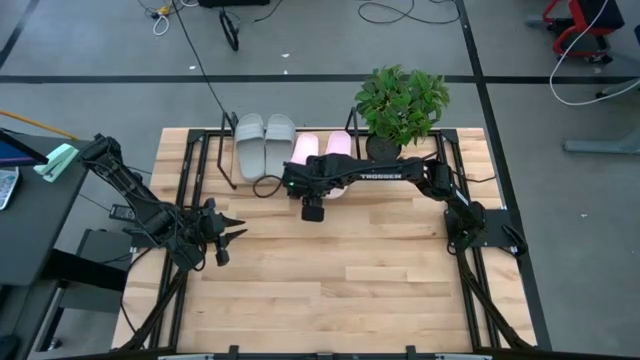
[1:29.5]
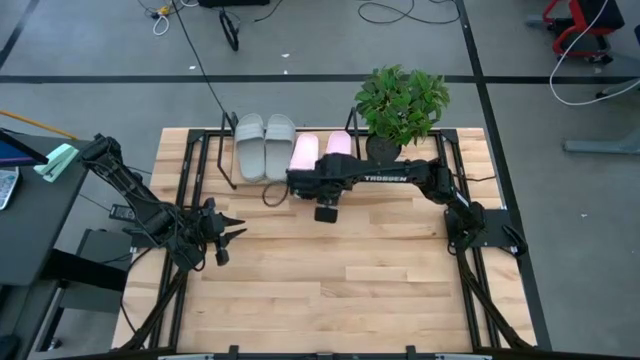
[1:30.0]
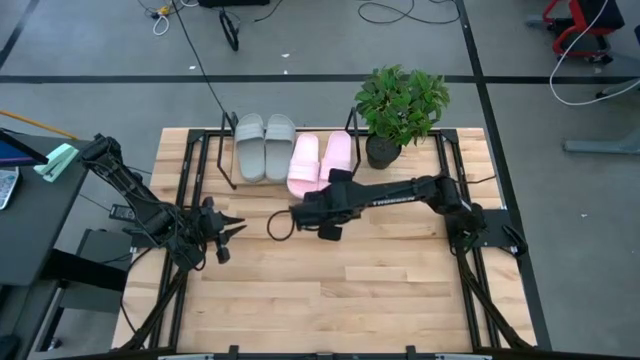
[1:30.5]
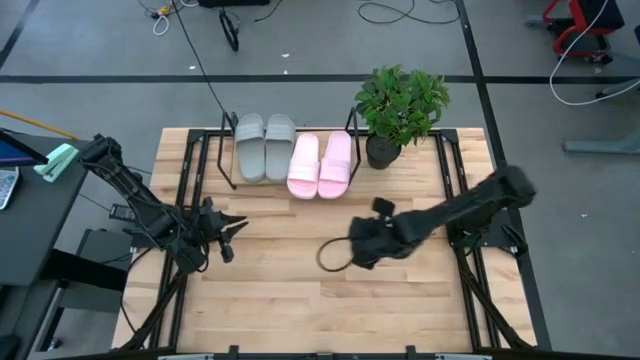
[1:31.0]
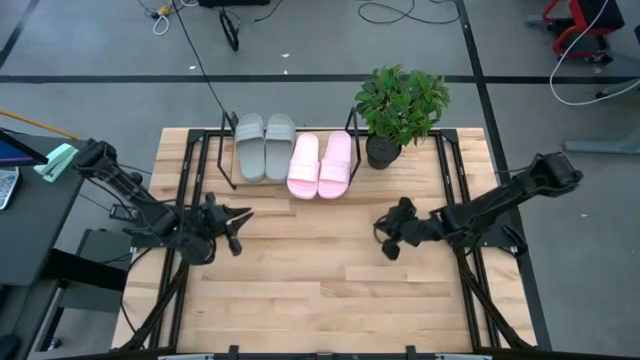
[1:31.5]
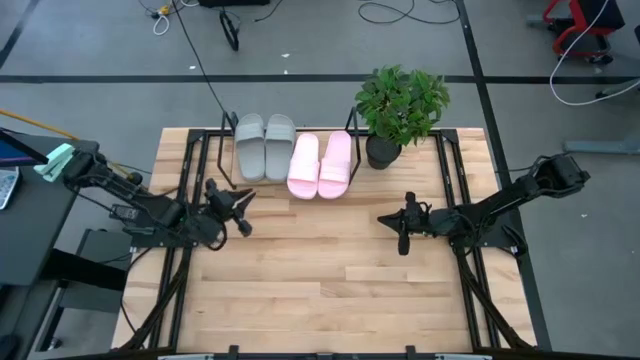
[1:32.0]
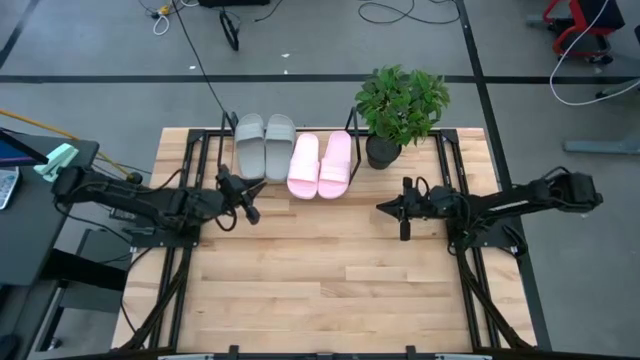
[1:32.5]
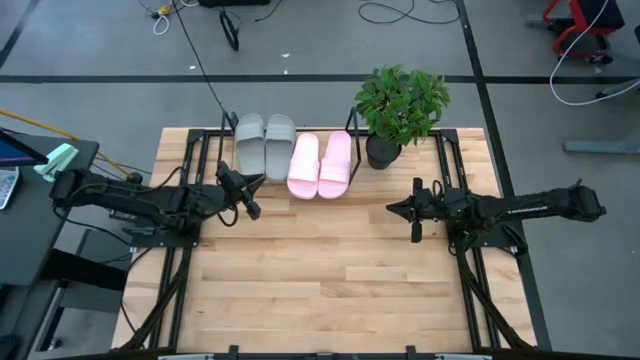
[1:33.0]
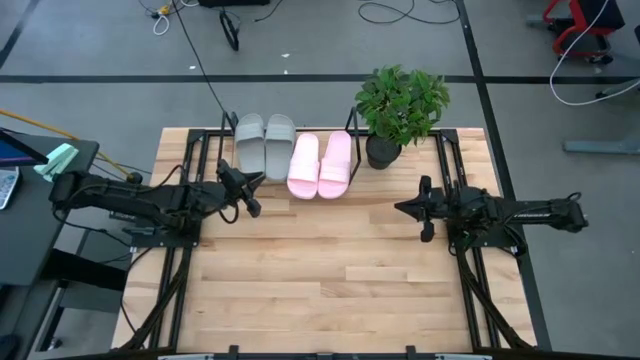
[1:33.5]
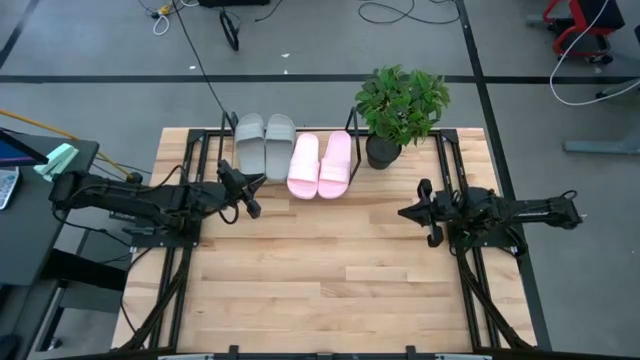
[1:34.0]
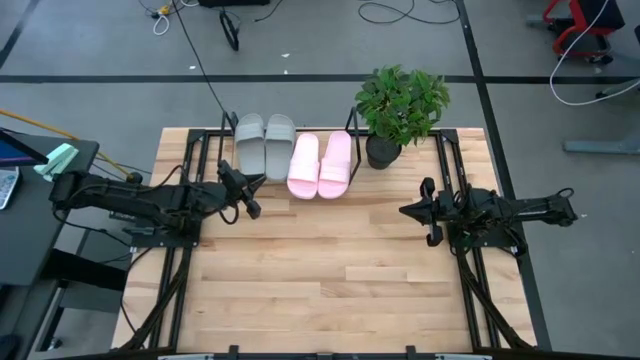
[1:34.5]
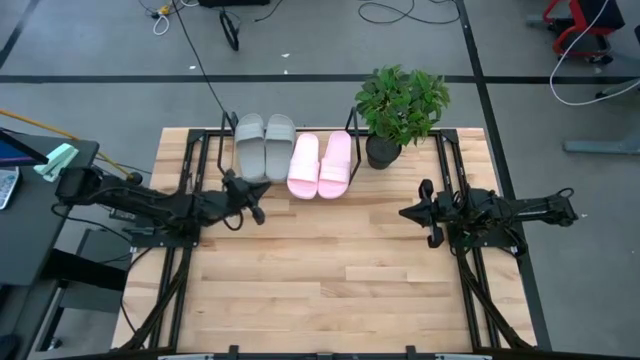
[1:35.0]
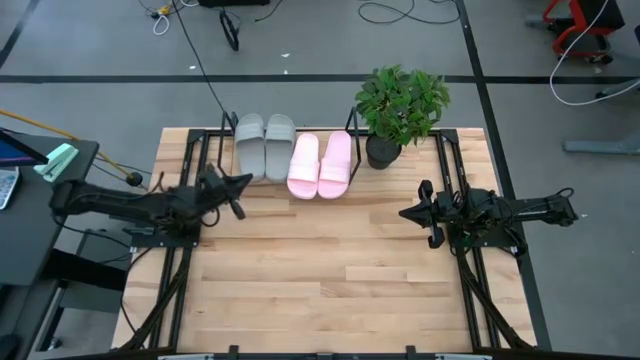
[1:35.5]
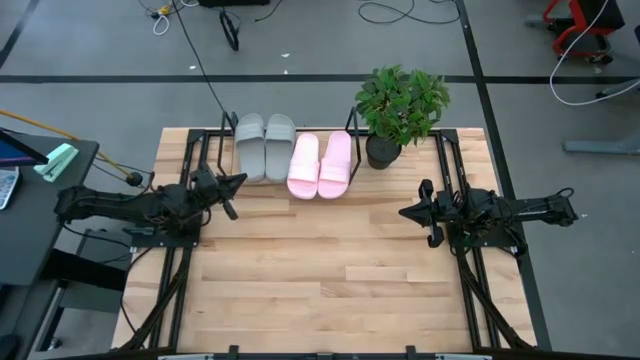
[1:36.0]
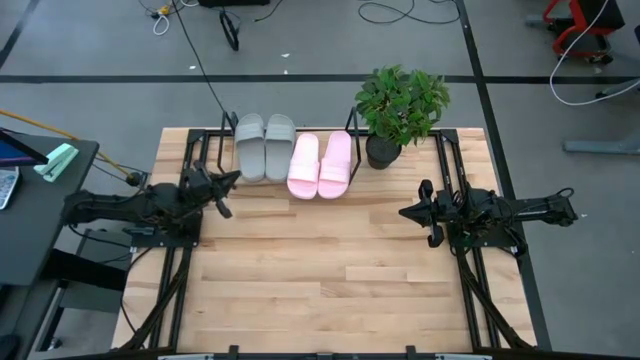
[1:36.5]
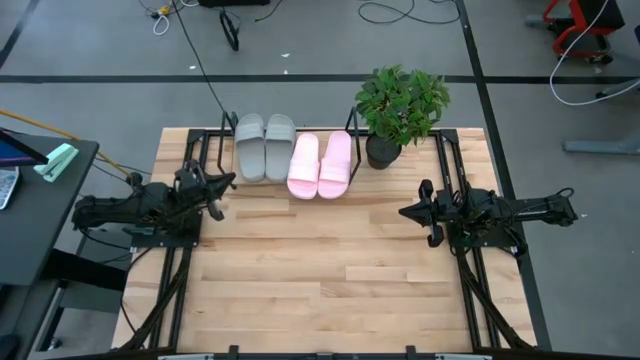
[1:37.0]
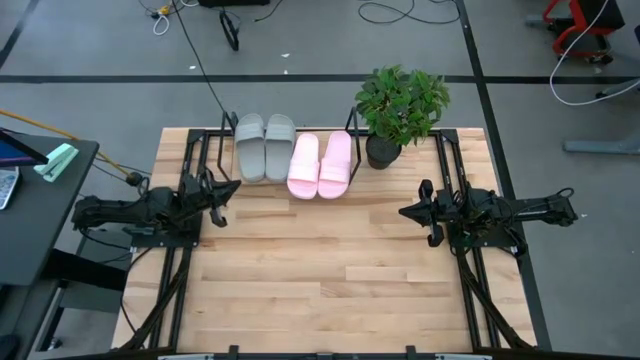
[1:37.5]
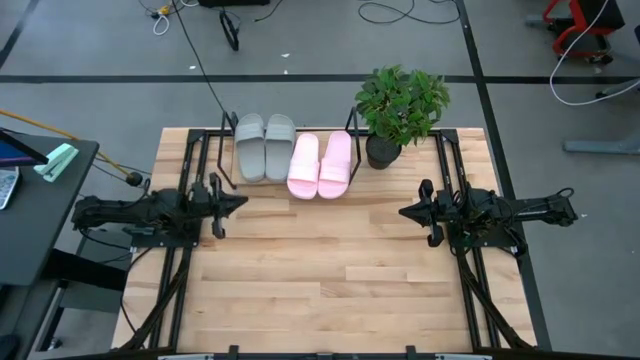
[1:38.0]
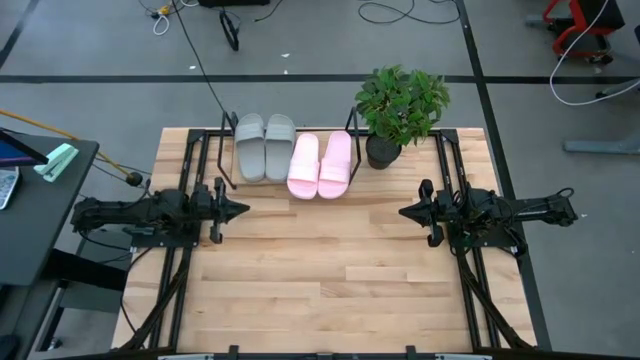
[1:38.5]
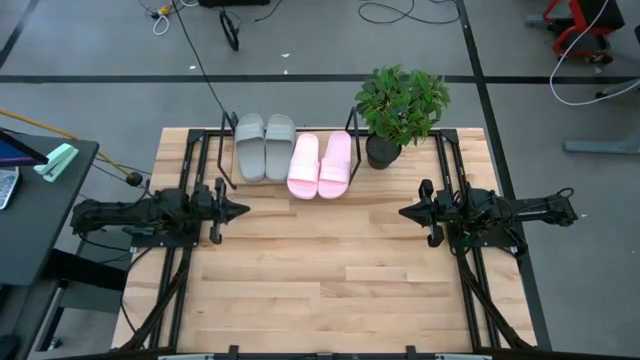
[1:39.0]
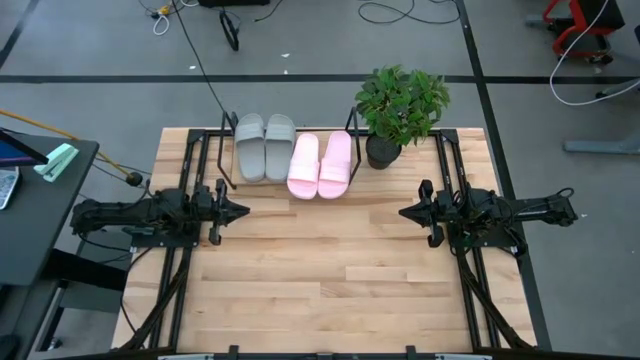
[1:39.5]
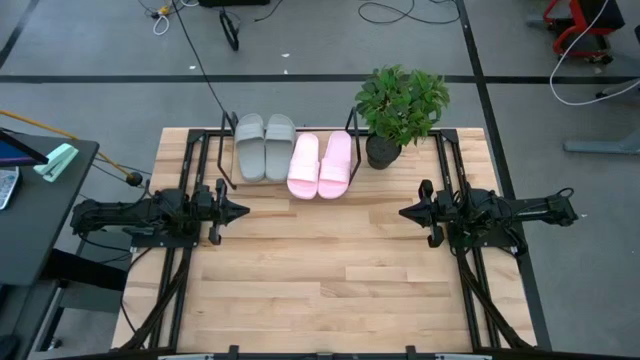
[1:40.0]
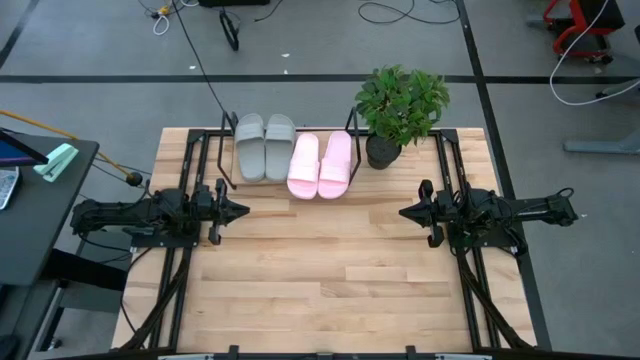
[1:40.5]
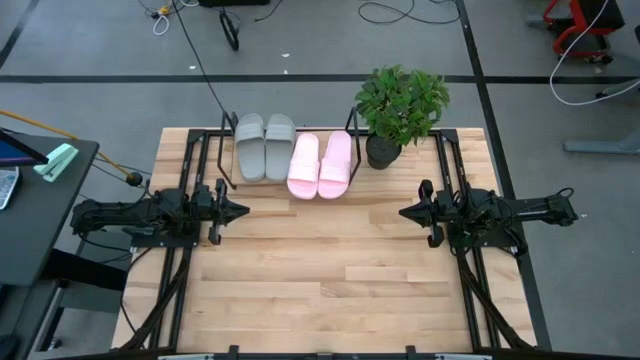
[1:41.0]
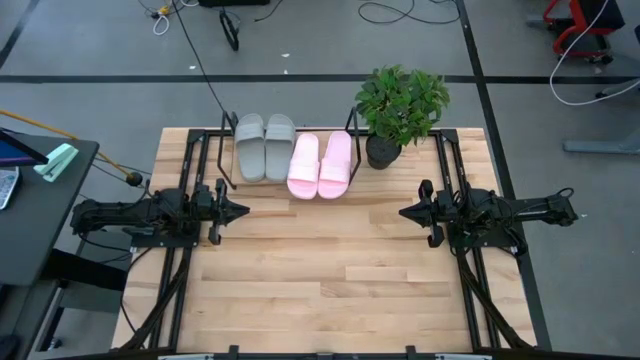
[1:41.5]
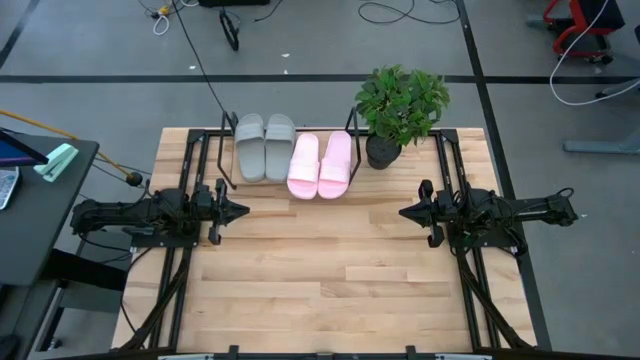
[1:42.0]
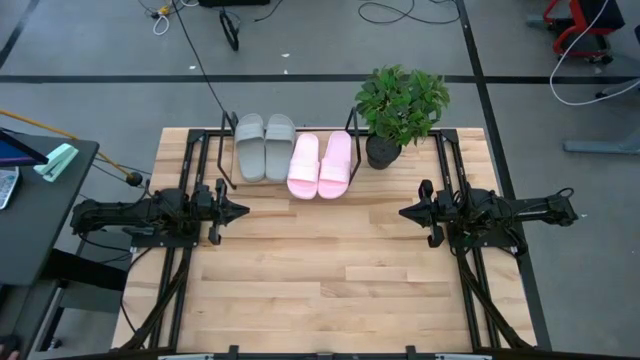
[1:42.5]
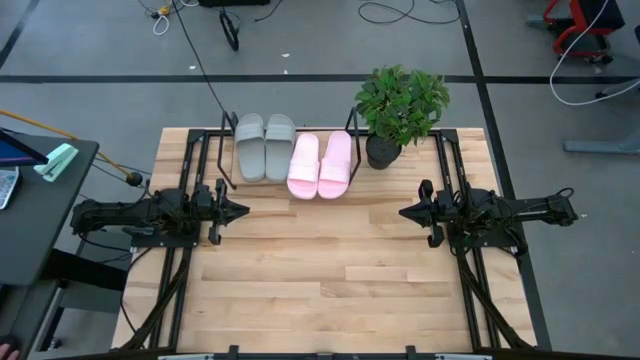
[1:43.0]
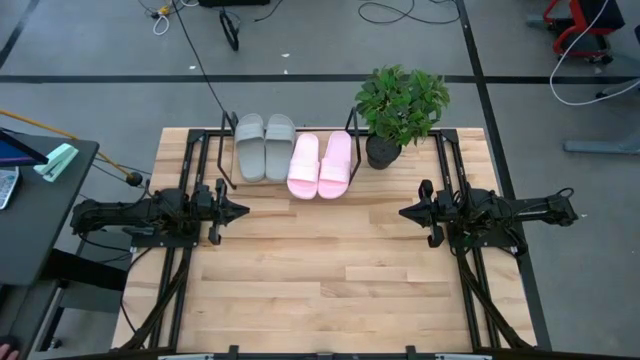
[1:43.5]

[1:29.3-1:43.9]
Task: Pick and place slides into the shelf
Return to Home Position

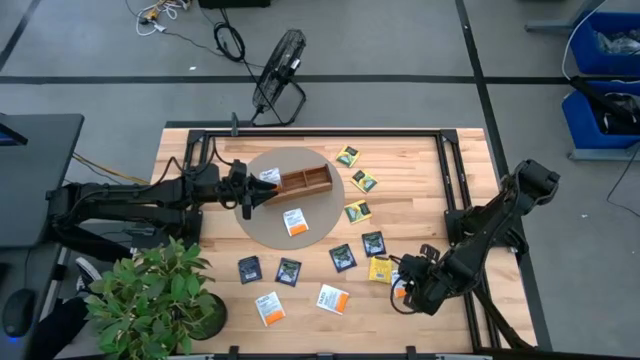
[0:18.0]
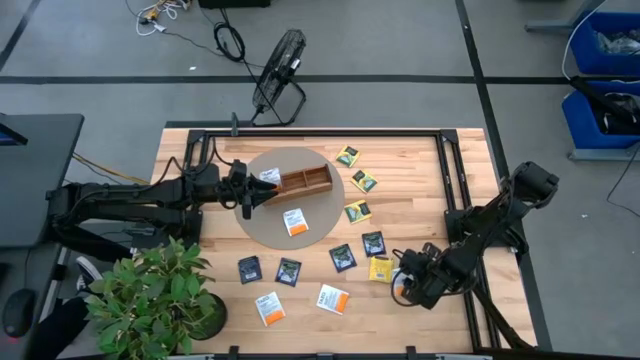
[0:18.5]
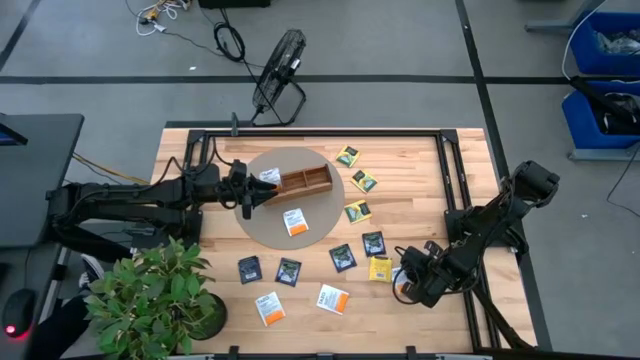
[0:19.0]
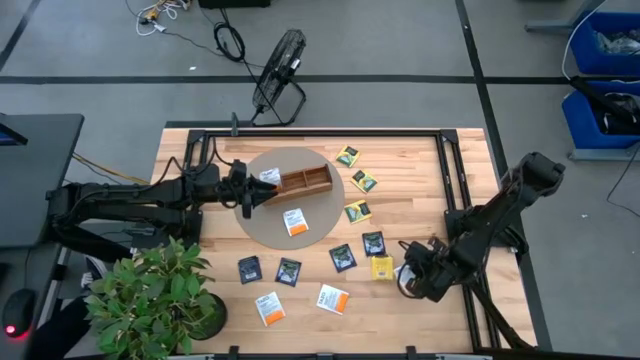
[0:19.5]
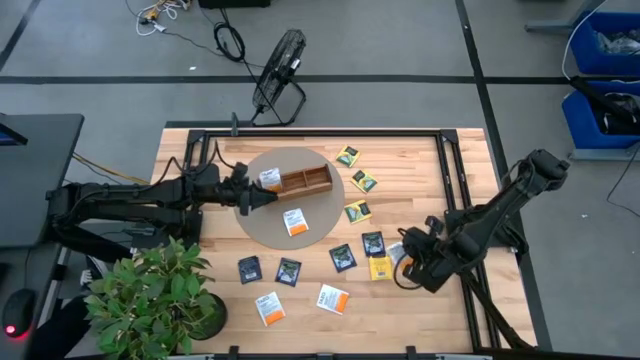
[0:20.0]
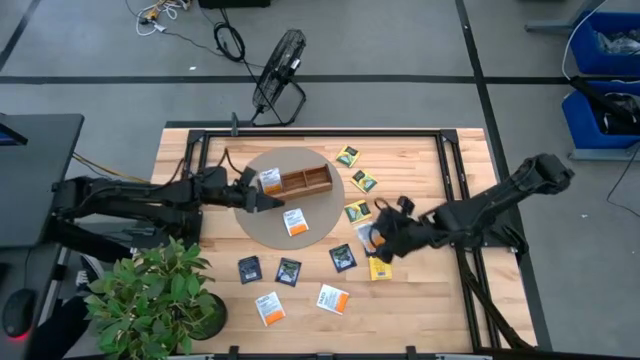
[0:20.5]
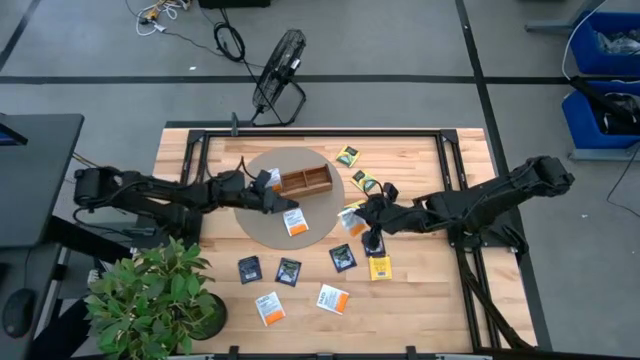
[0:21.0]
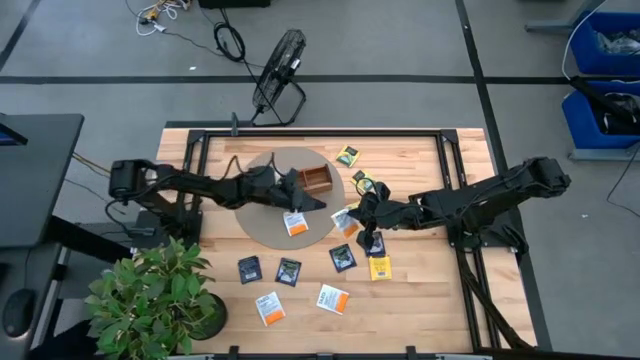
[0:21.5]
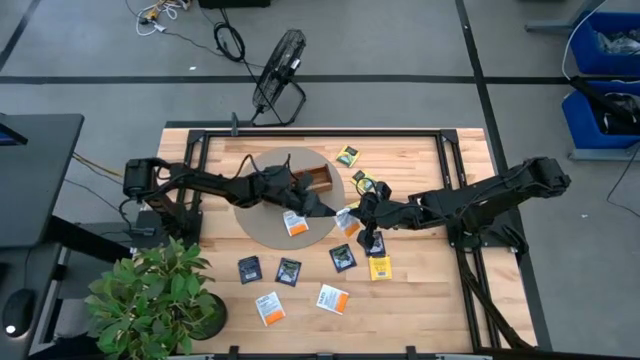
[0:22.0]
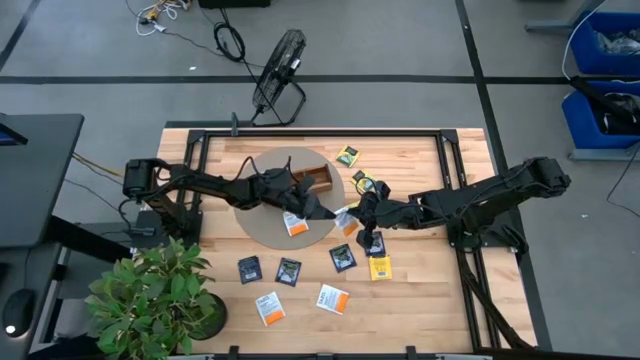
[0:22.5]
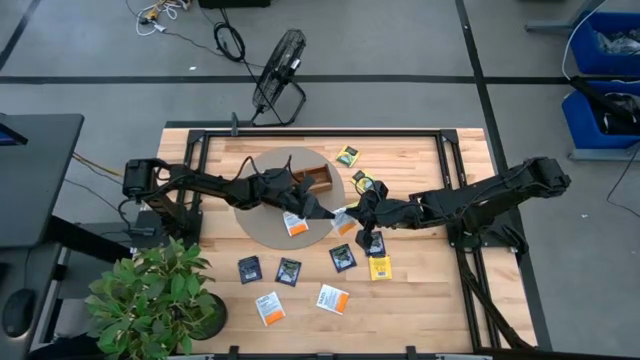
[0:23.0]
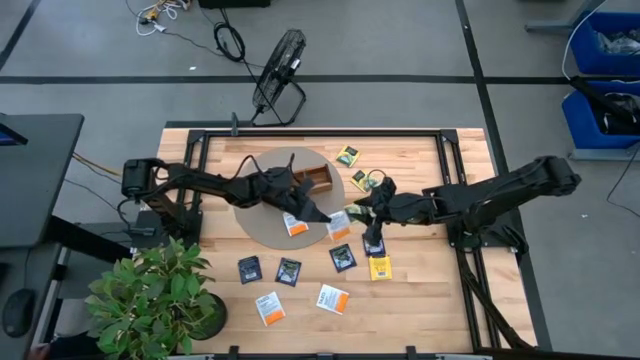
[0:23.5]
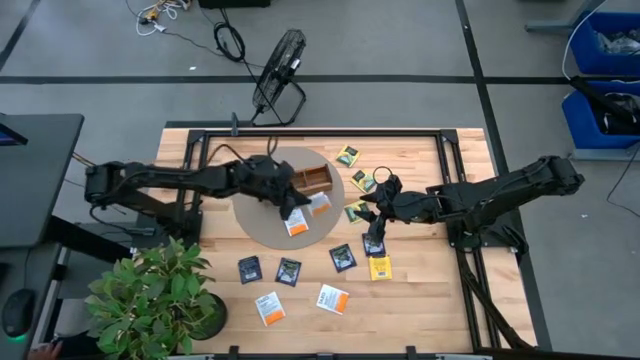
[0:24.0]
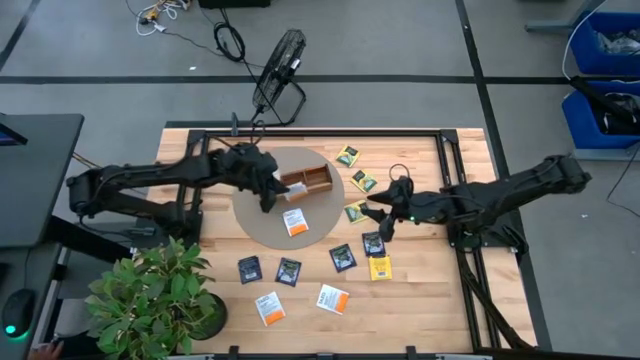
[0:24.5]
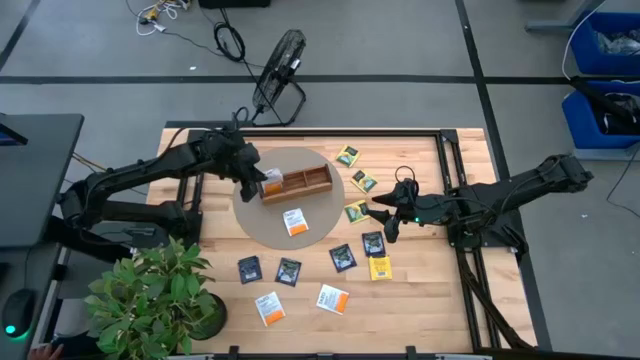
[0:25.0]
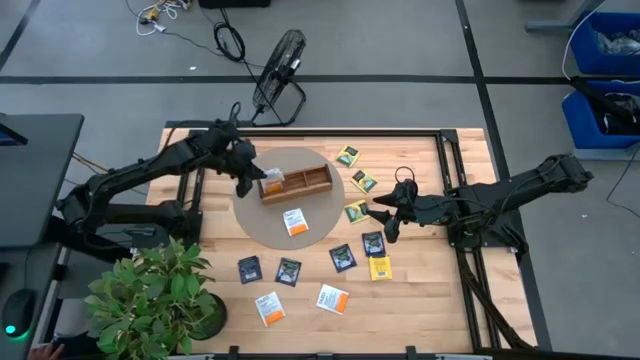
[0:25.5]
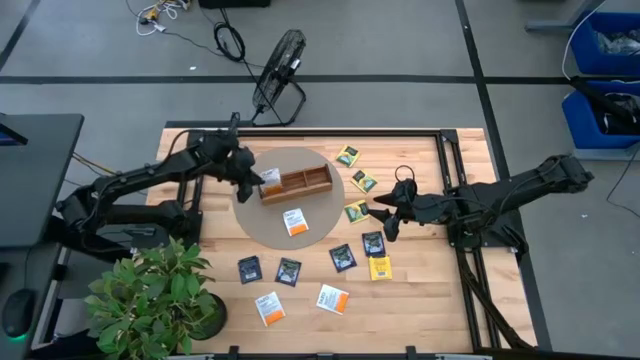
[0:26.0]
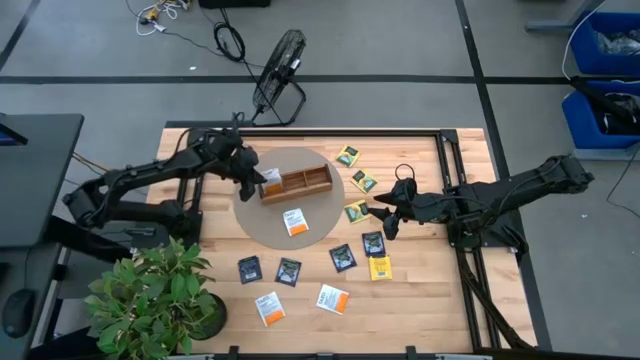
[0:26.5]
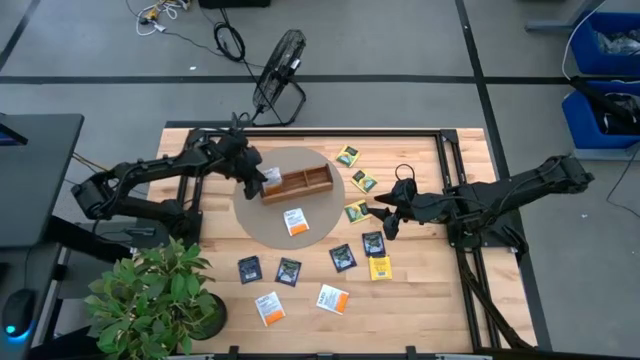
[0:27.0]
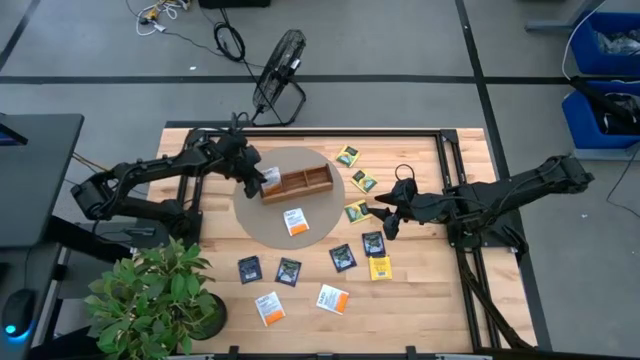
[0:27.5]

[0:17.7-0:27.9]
Task: Pick & Place Tea
Put the white tea bag into the left section of the wooden organizer
